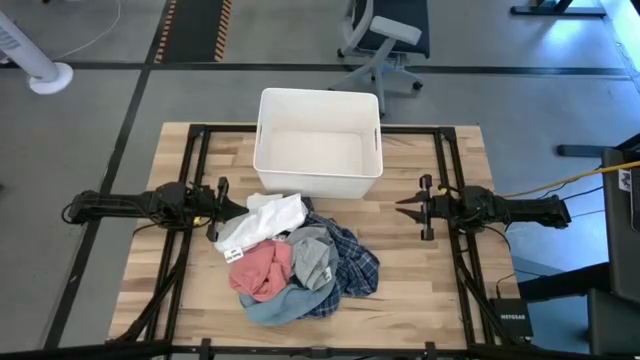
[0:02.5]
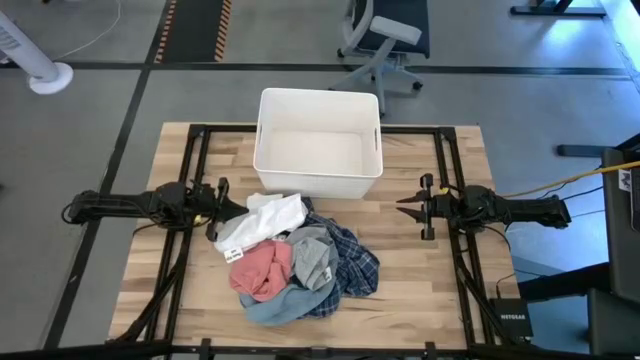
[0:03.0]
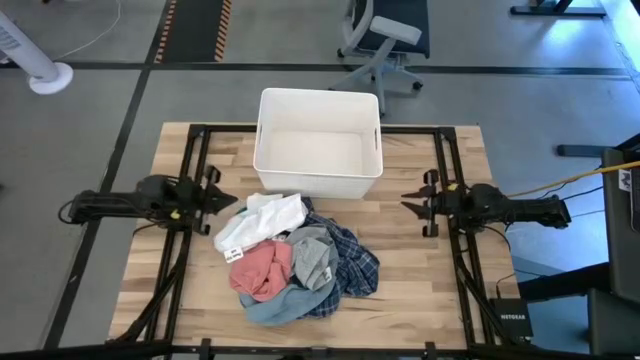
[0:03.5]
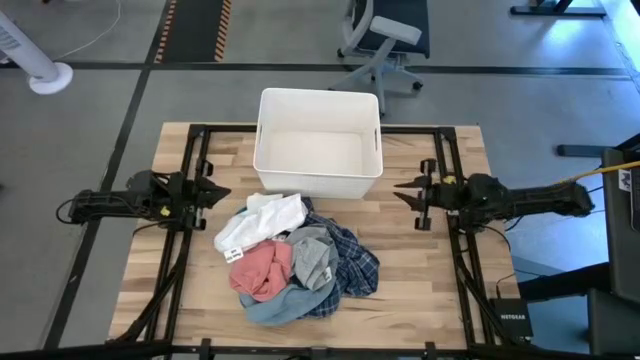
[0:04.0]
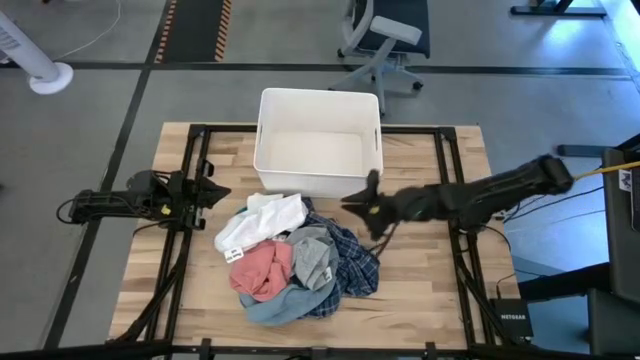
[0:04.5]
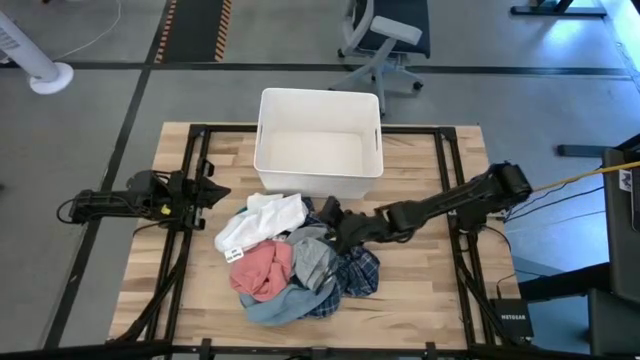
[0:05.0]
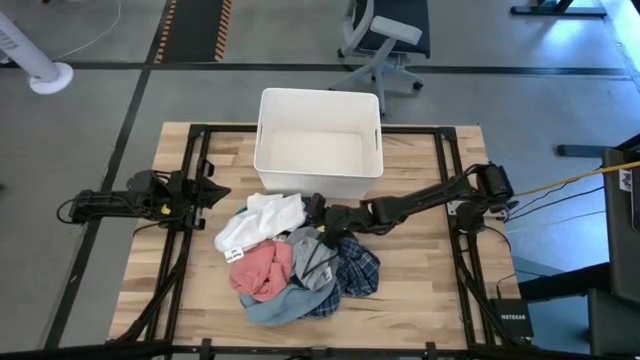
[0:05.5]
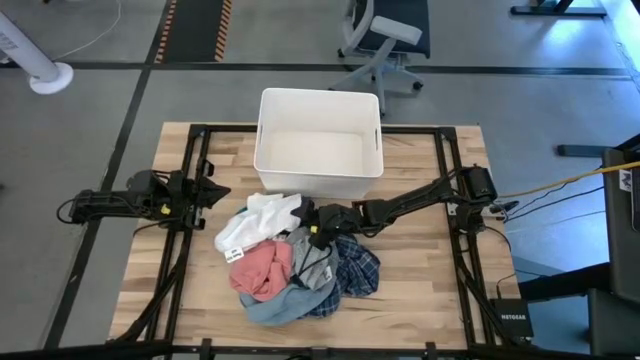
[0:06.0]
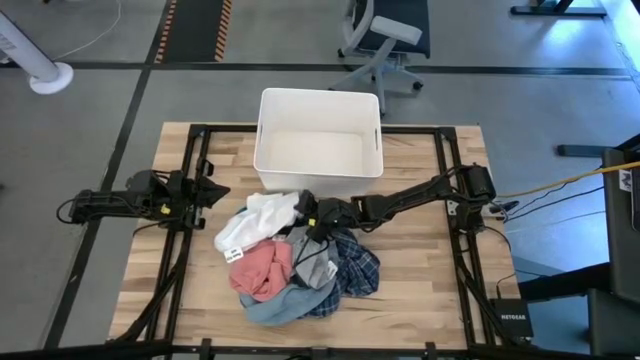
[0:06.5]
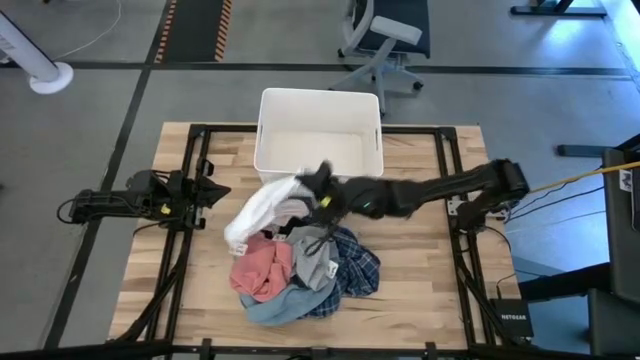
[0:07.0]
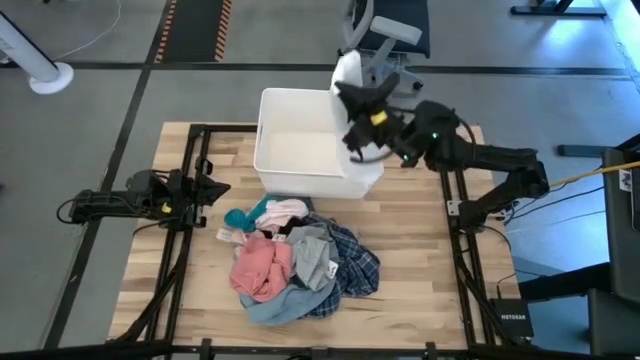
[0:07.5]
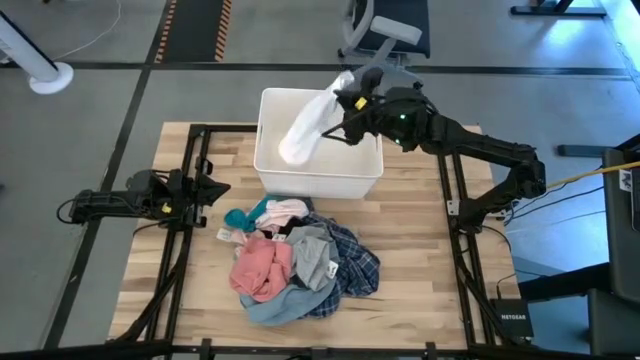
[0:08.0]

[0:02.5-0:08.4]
Task: Sort clothes
Put the white shorts into the white laundry bin

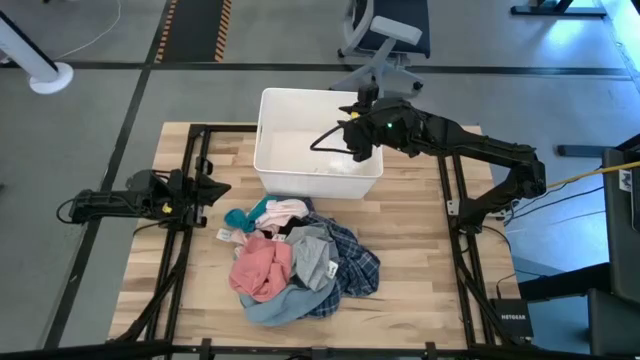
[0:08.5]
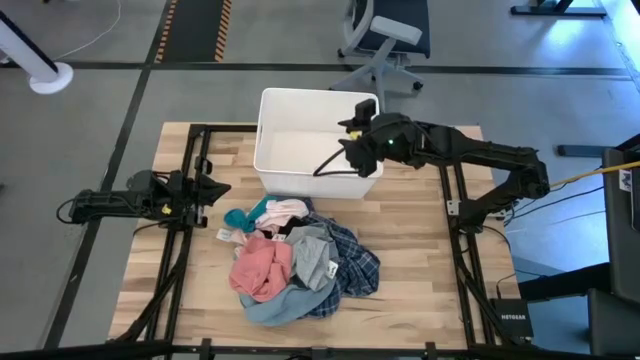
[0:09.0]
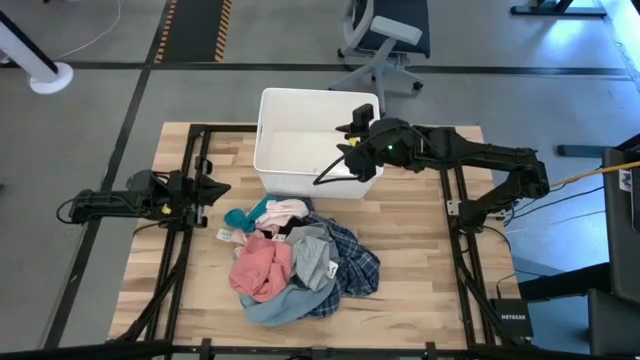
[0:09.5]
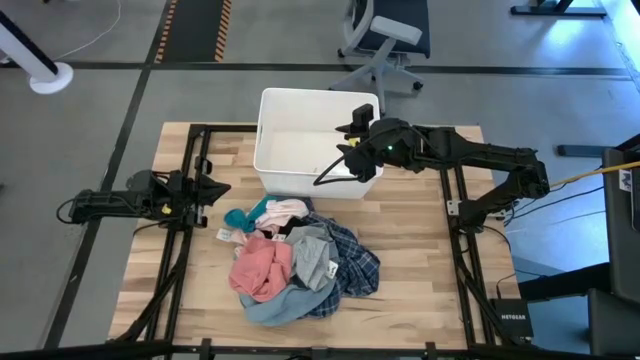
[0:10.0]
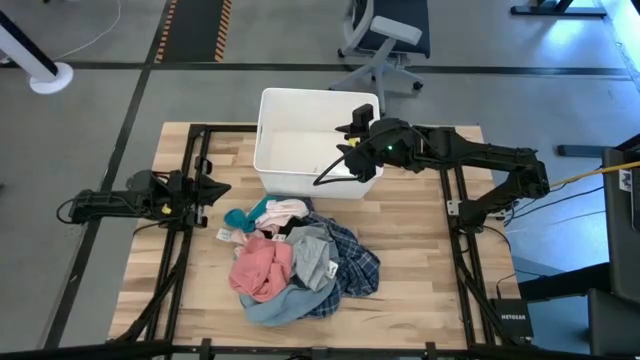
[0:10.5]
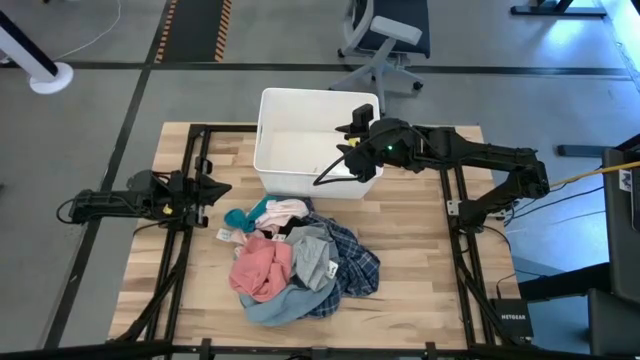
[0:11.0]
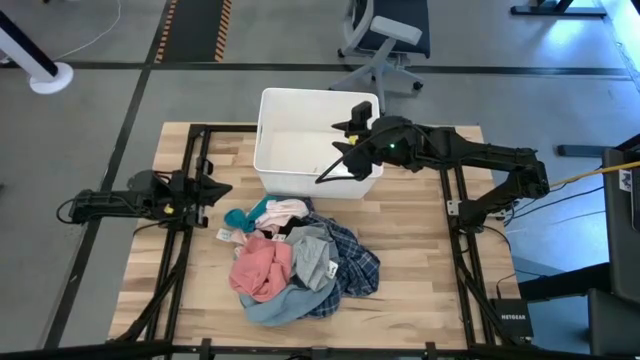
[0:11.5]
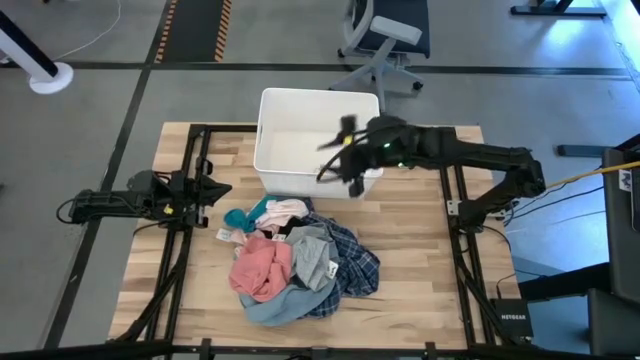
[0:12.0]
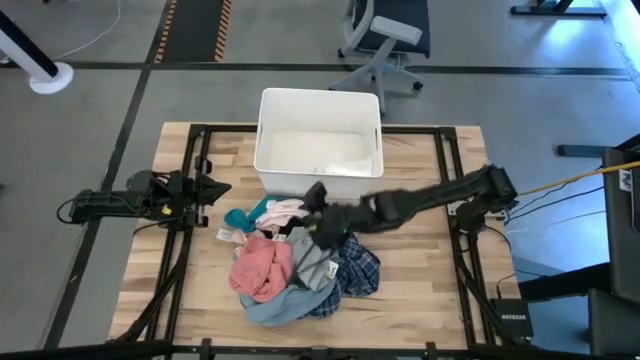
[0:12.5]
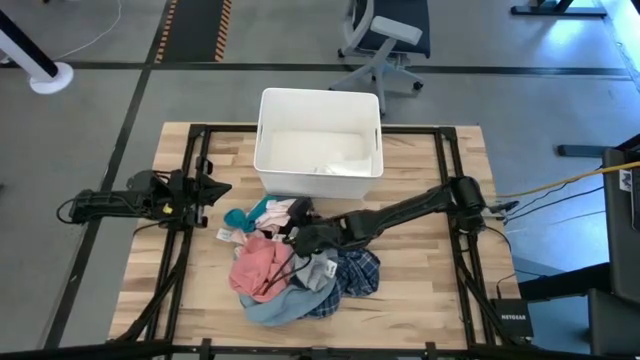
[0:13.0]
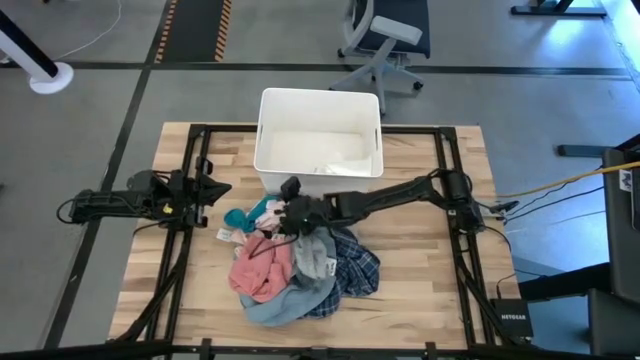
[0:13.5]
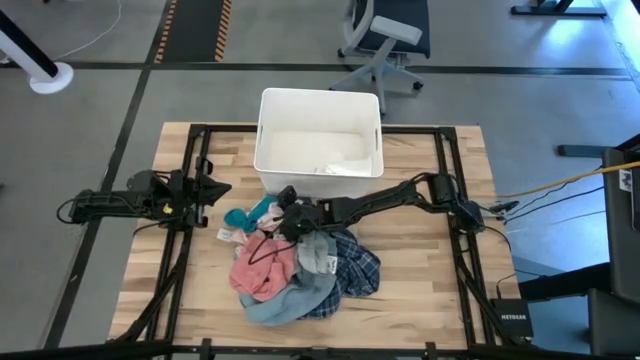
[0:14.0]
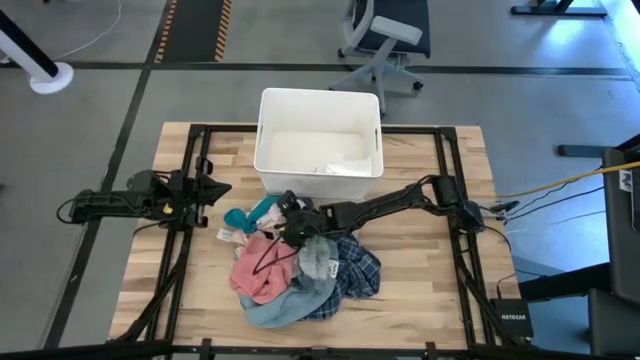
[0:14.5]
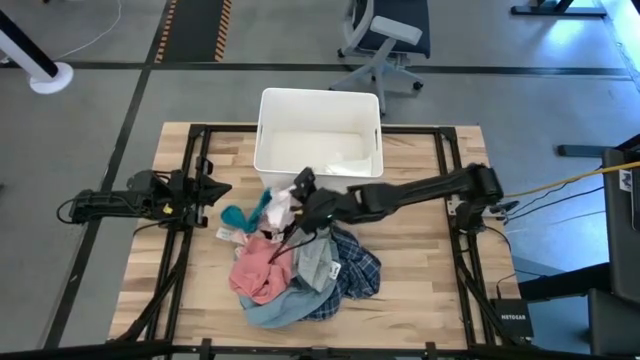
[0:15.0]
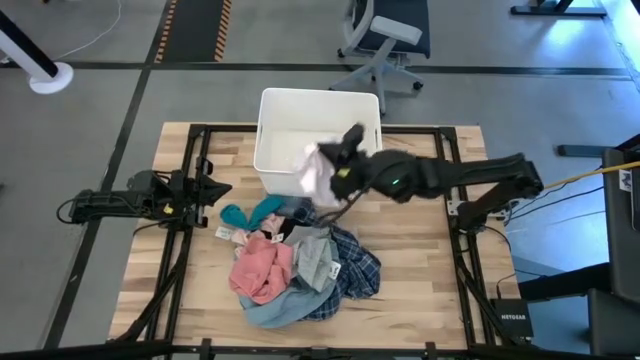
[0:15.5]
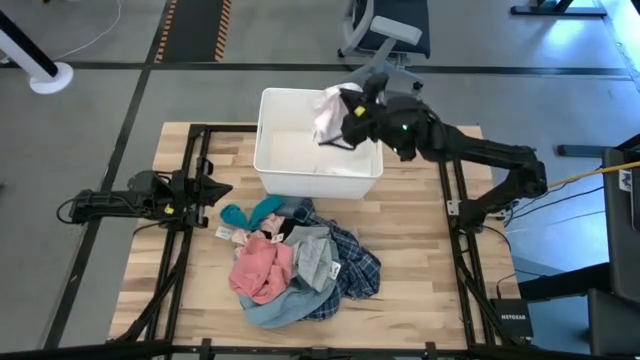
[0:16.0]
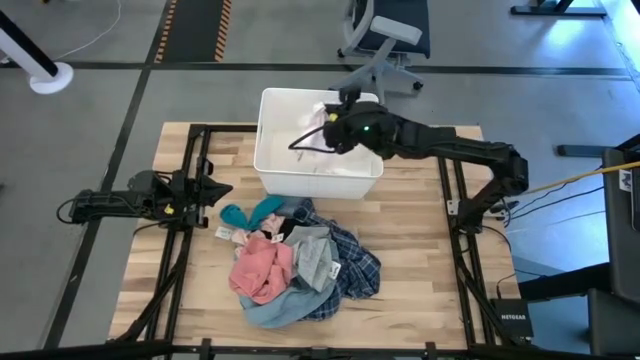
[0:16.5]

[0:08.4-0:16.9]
Put the light pink underwear into the white laundry bin

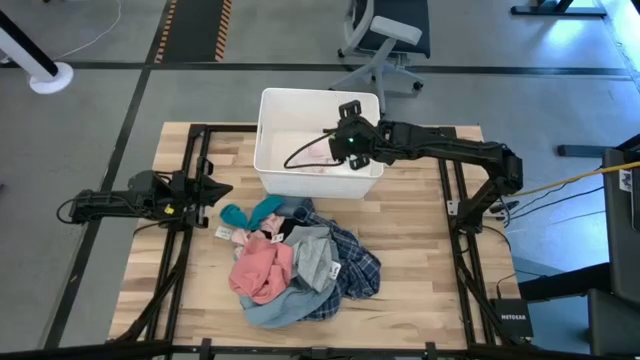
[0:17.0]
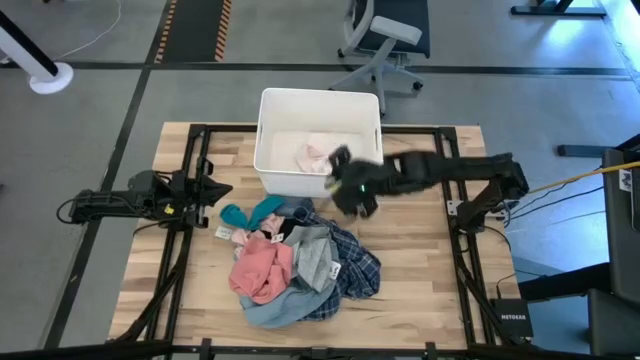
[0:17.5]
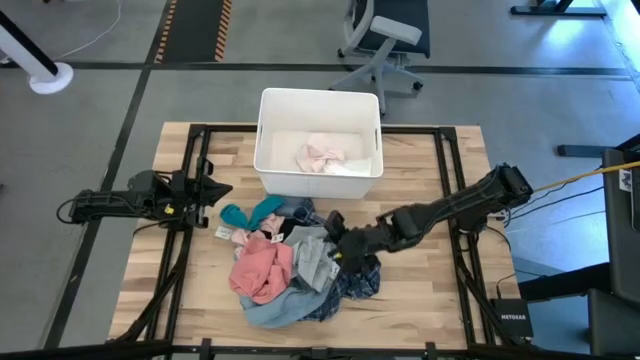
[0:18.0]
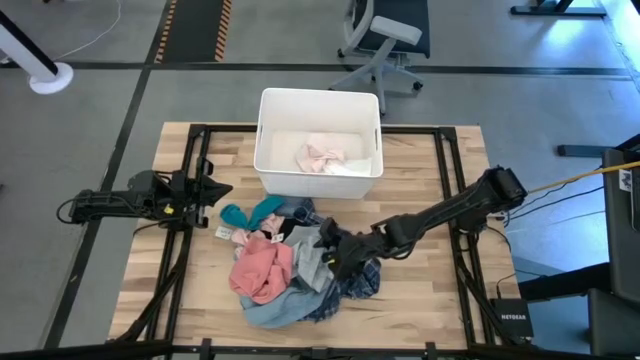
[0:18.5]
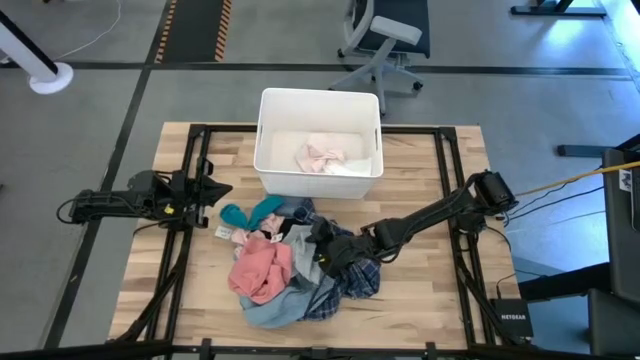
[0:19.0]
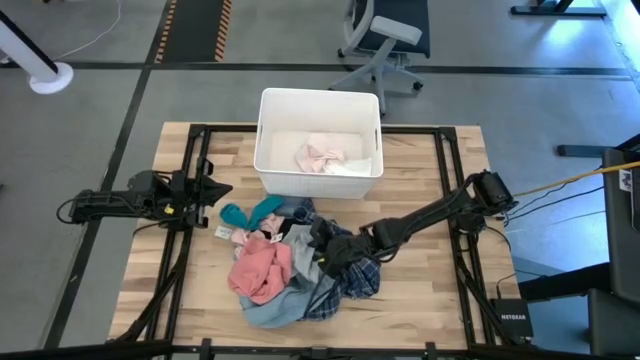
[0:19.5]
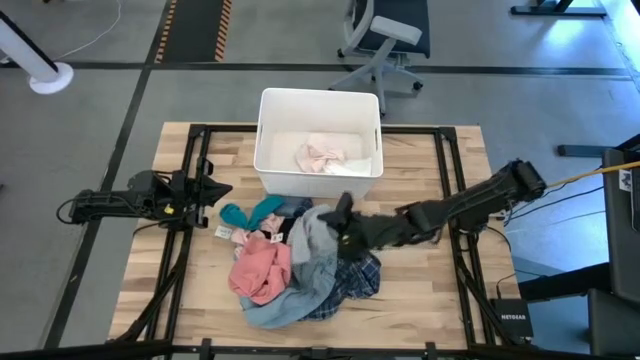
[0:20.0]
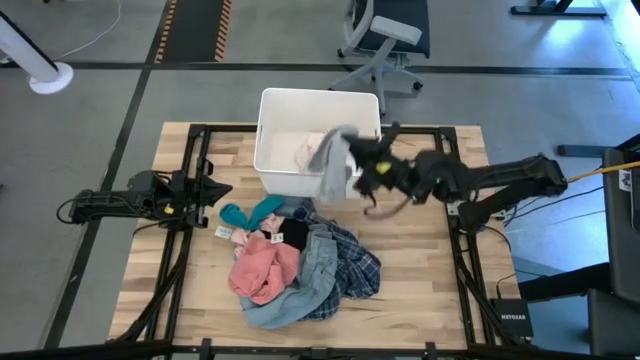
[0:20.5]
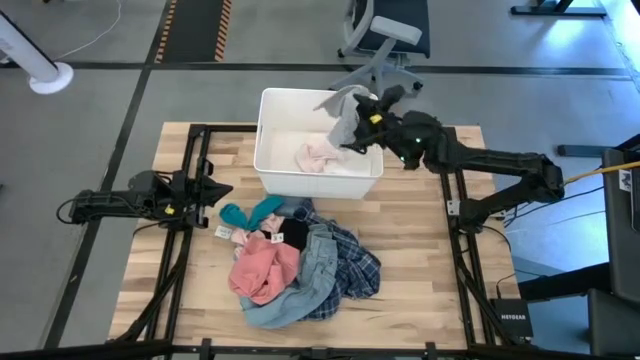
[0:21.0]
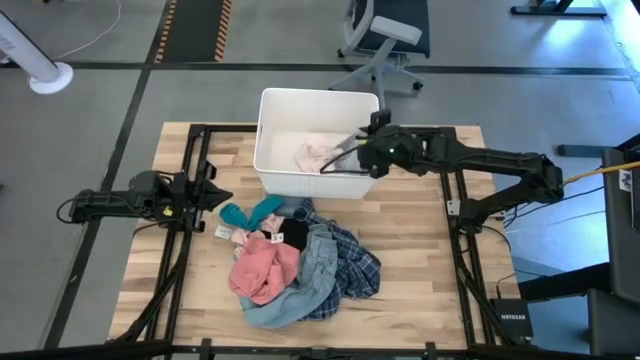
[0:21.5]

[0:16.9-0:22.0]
Put the gray boxer shorts into the white laundry bin

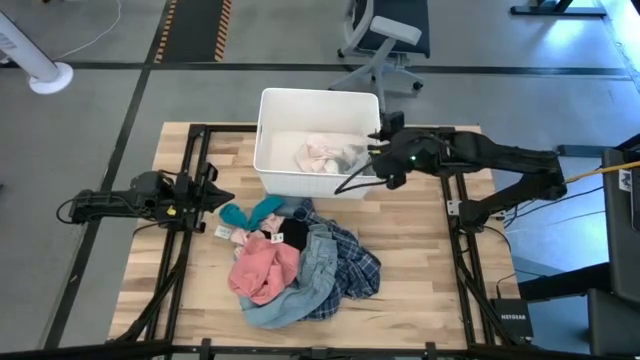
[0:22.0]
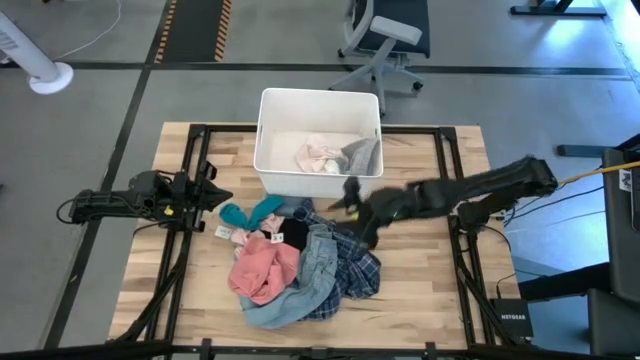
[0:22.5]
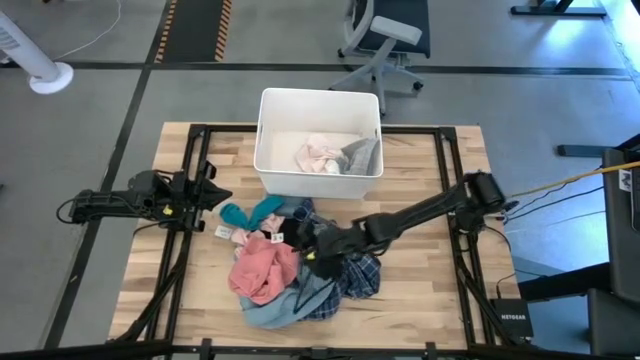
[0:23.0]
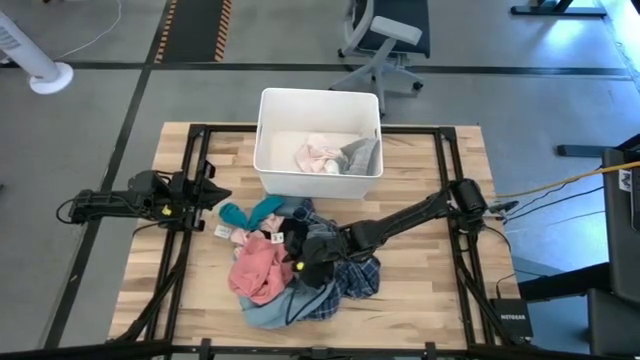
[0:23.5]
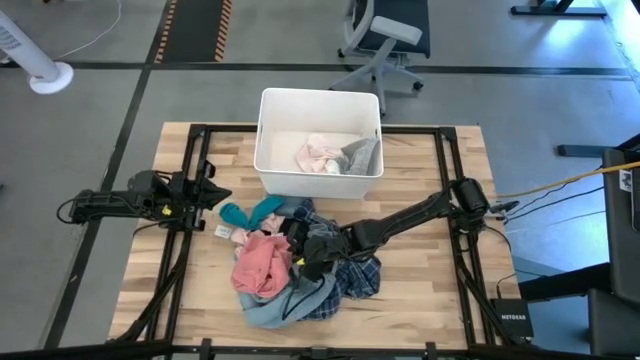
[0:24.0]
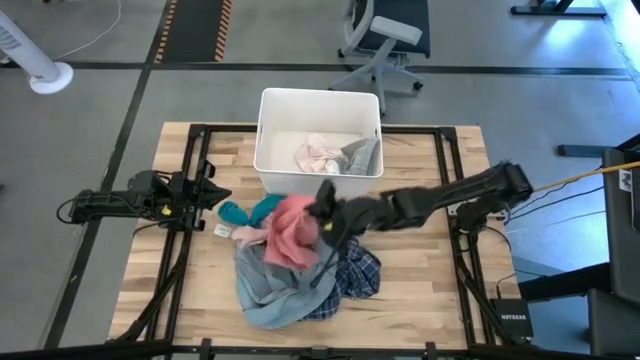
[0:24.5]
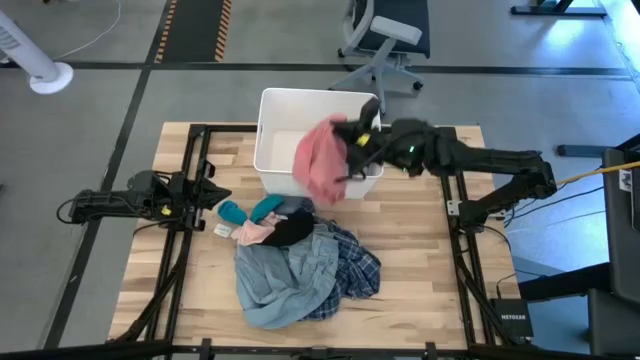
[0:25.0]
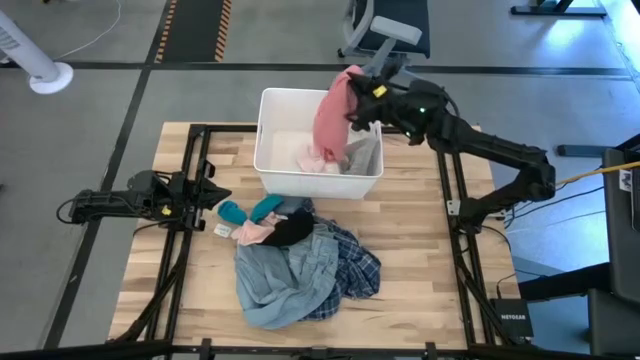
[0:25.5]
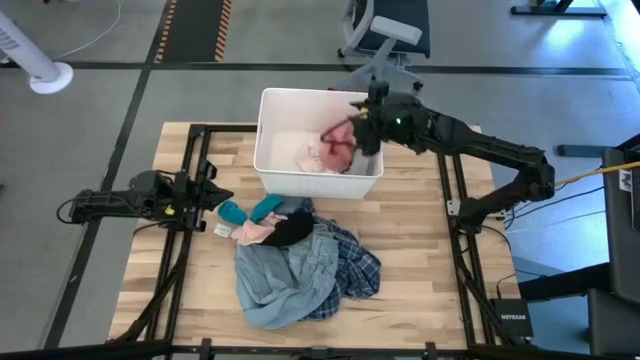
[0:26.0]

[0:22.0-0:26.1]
Put the pink underwear into the white laundry bin
